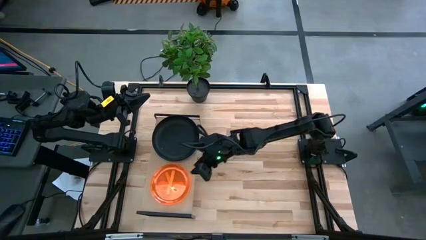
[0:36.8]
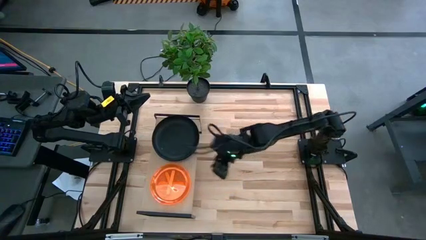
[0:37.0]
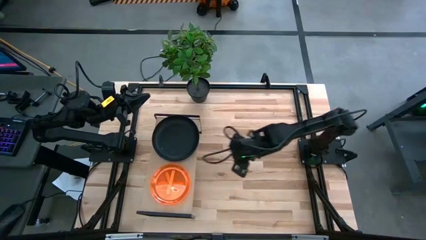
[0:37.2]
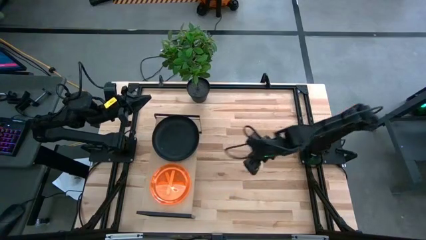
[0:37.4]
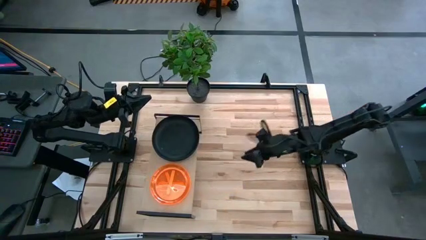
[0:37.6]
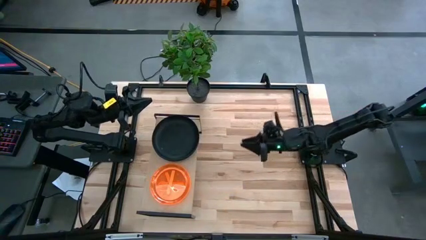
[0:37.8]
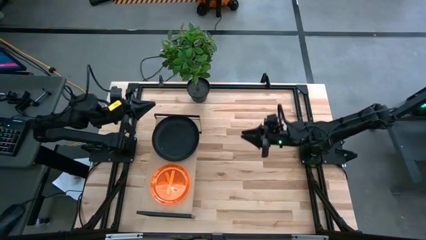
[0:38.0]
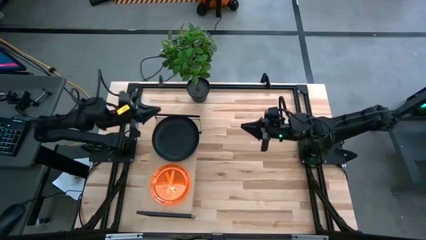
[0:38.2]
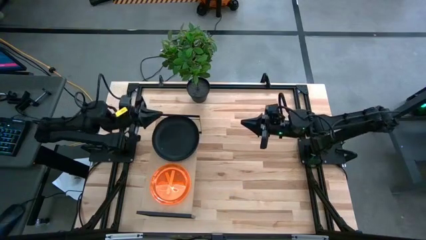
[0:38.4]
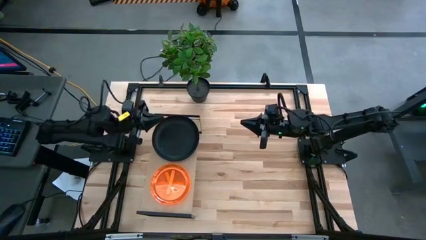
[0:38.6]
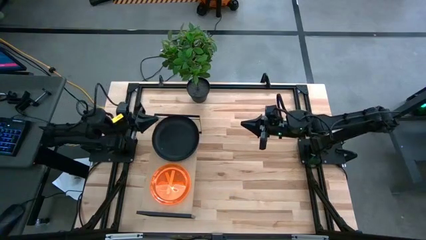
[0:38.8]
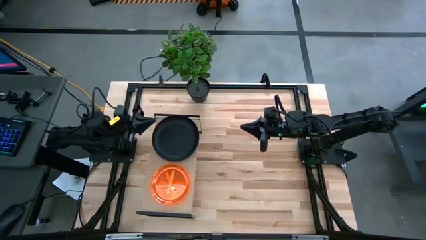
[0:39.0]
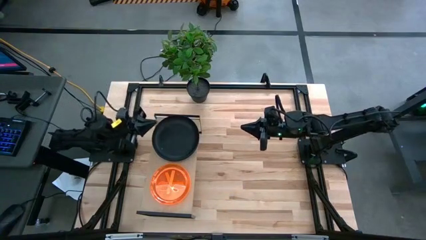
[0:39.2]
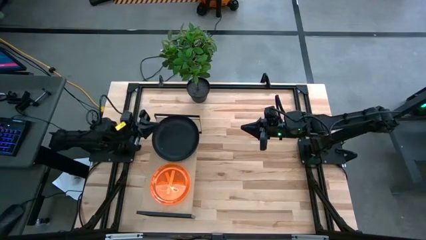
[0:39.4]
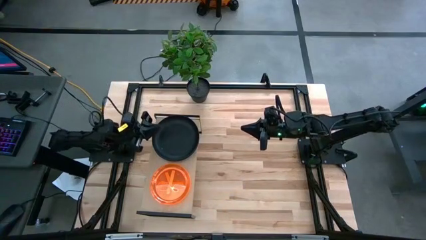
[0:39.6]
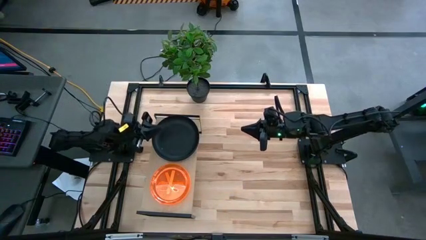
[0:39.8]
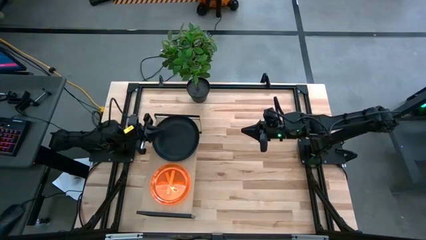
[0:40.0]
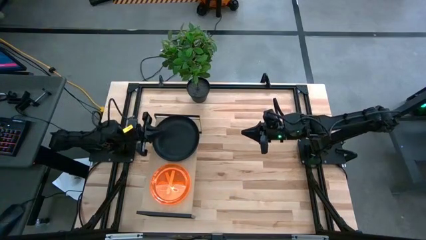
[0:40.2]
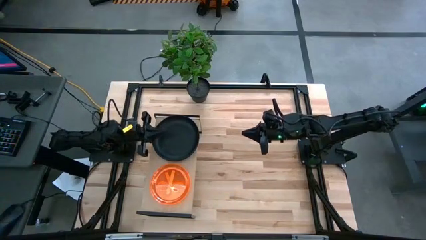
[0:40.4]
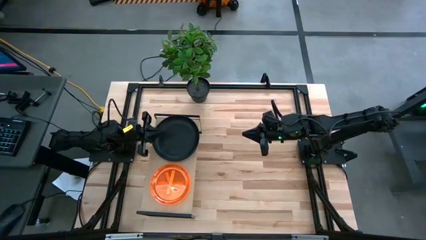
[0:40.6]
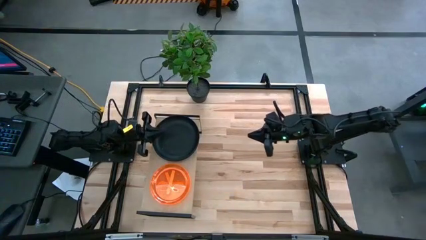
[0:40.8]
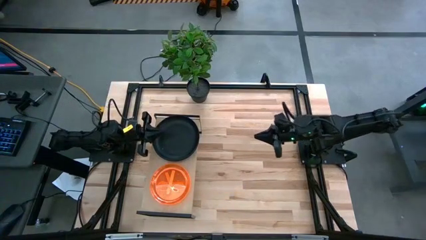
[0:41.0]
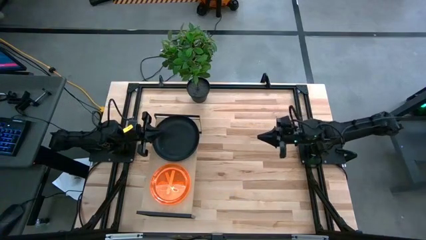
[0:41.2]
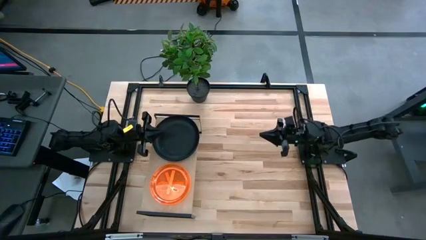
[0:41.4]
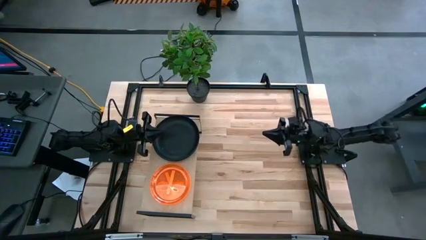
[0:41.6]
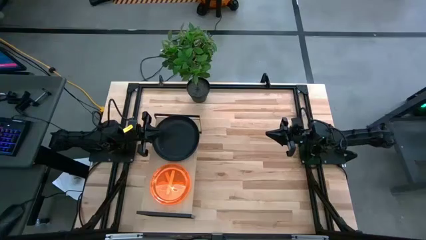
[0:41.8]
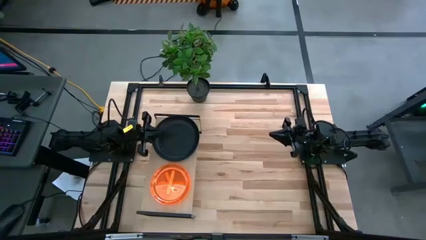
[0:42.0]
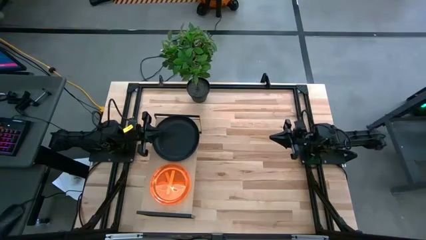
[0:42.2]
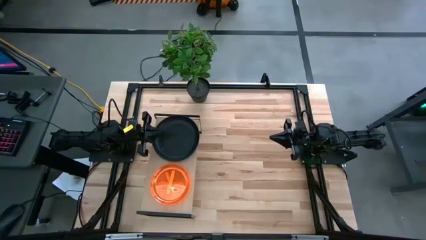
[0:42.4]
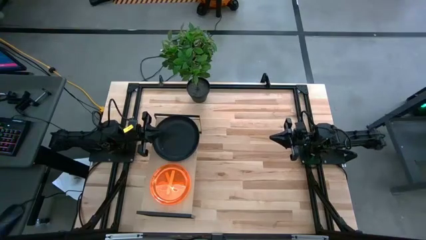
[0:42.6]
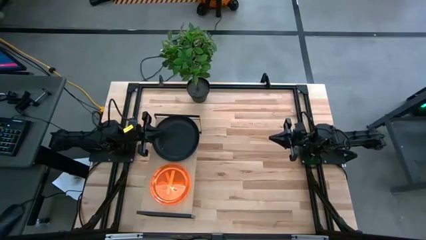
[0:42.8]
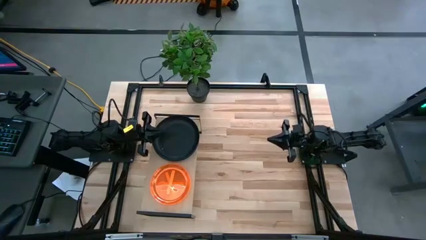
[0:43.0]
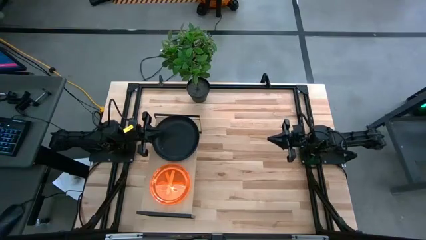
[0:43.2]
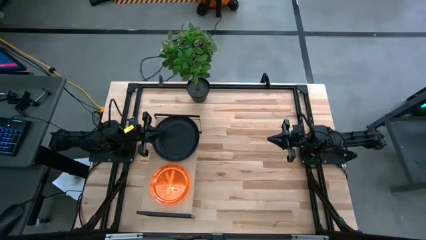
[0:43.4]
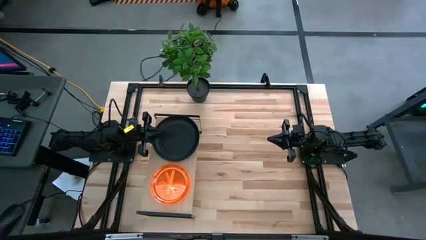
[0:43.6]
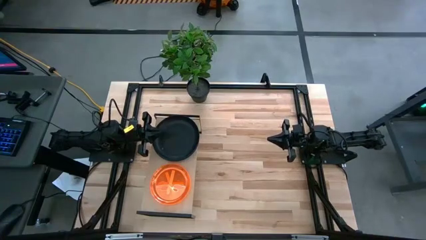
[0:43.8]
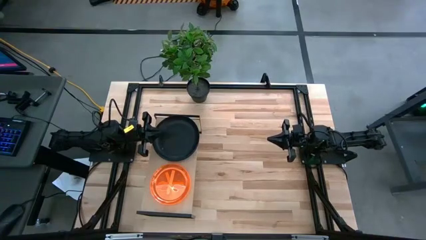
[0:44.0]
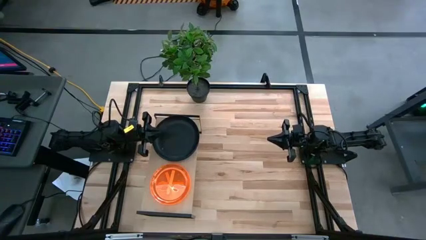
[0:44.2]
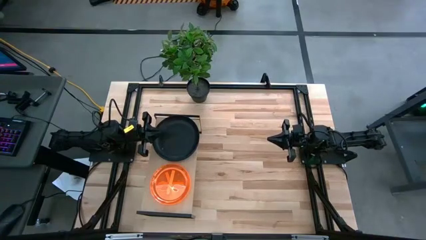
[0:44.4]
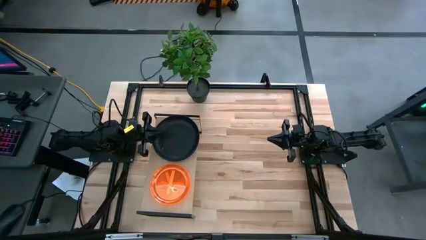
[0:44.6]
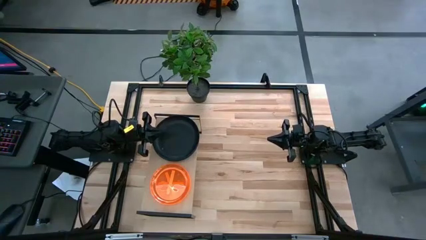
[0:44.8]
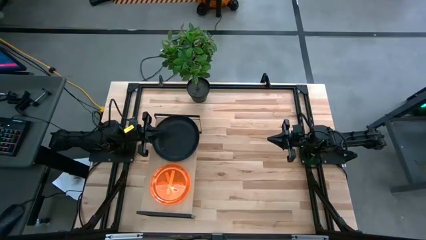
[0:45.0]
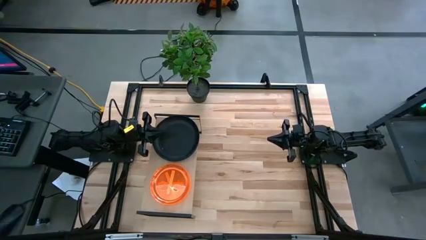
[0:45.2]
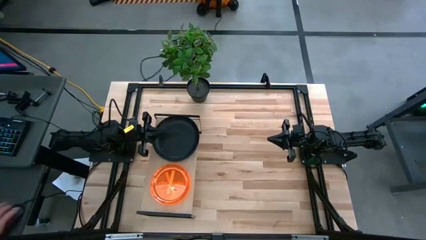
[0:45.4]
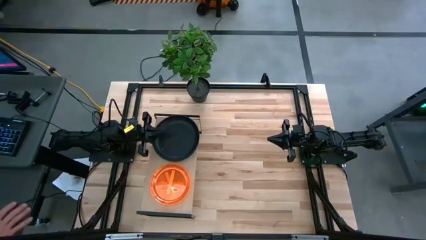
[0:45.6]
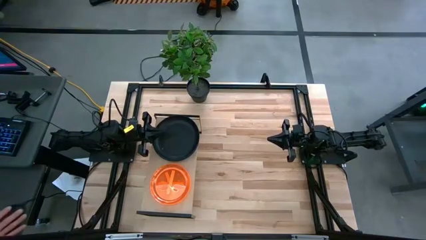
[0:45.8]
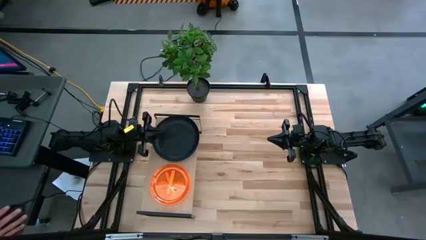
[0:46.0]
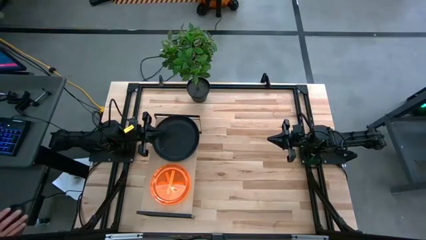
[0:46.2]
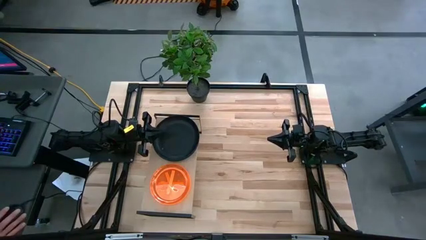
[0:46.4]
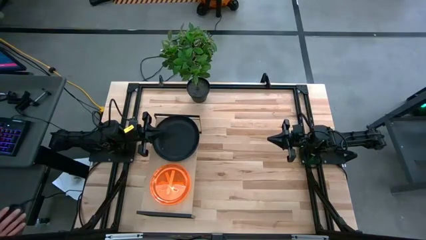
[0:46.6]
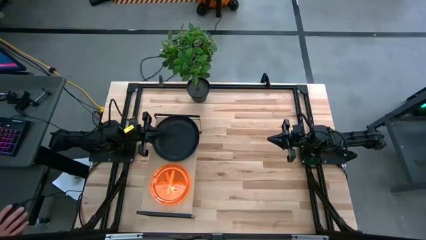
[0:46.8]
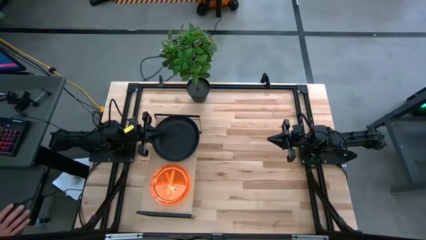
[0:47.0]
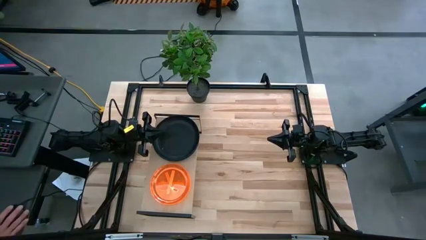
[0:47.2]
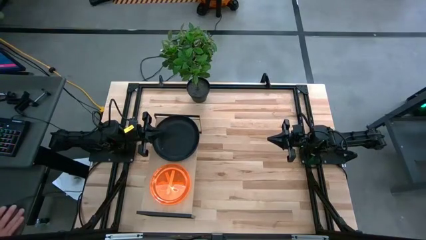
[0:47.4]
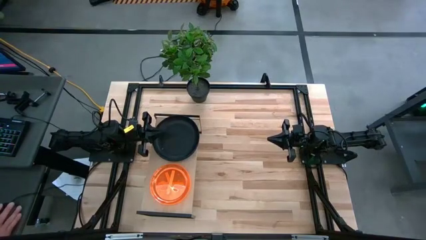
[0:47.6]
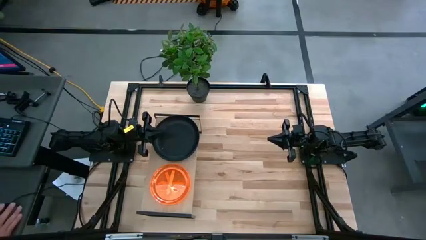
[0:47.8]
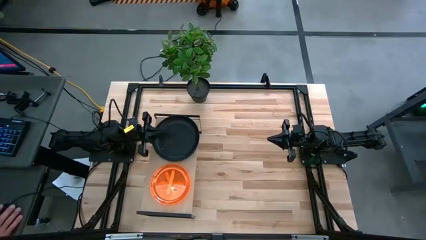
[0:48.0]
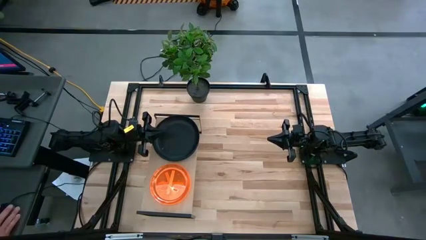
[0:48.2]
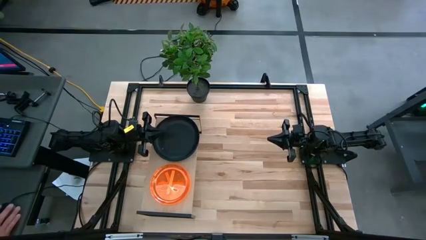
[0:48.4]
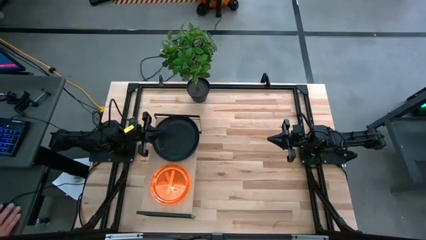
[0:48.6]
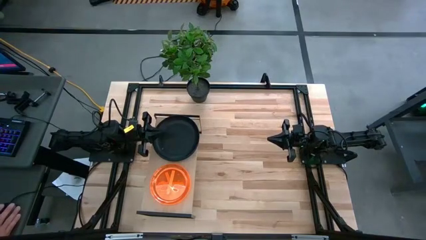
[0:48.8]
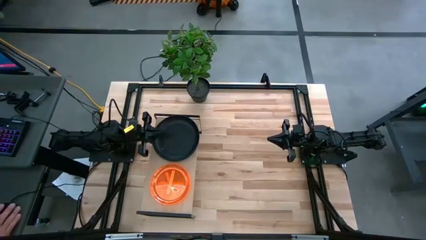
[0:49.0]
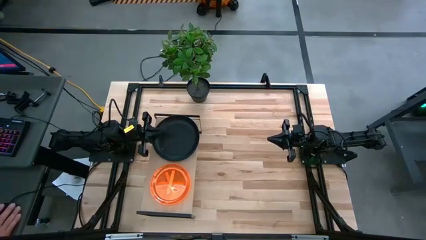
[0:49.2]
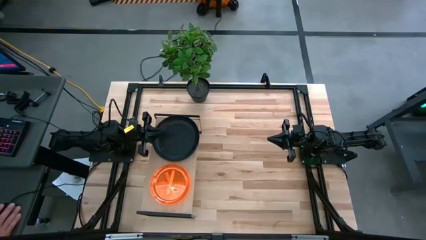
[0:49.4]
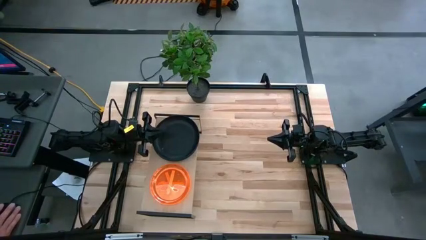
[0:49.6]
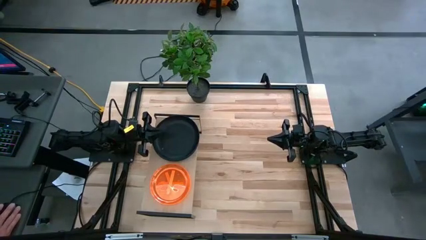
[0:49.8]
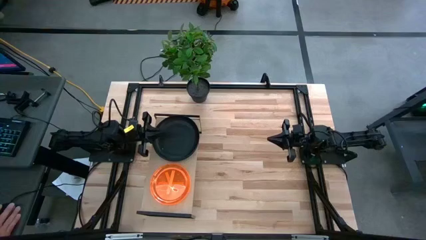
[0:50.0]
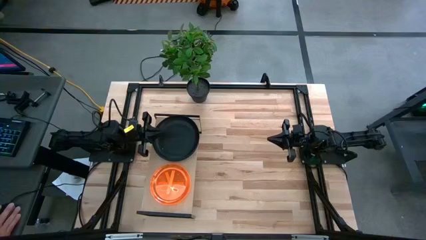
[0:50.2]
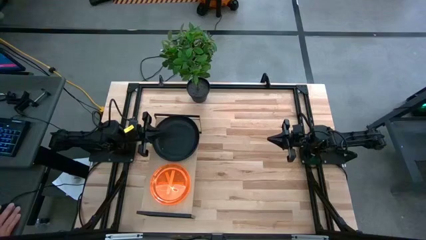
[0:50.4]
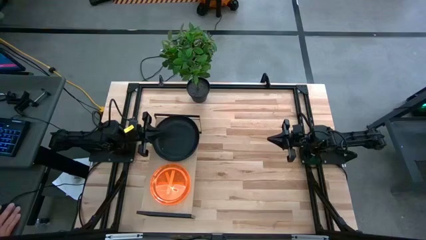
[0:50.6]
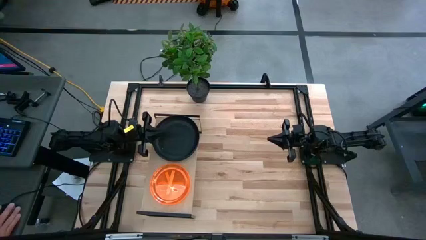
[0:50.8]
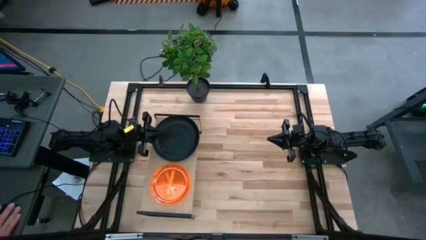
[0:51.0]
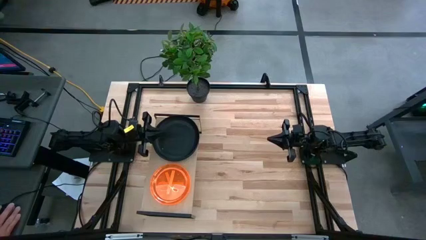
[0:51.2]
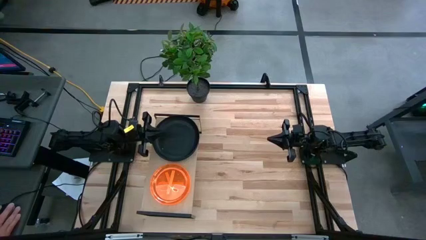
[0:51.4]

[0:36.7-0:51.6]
Task: Place and stack plates onto a shelf
Return to Home Position

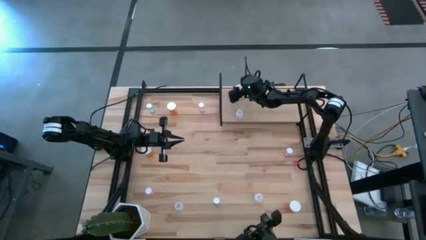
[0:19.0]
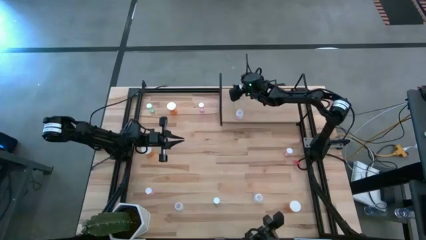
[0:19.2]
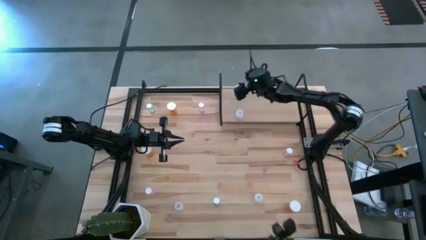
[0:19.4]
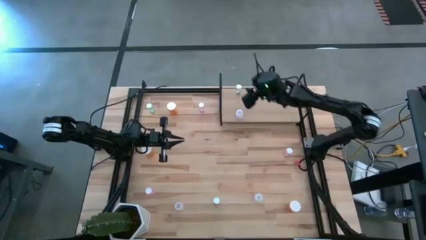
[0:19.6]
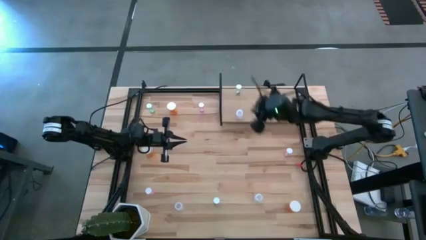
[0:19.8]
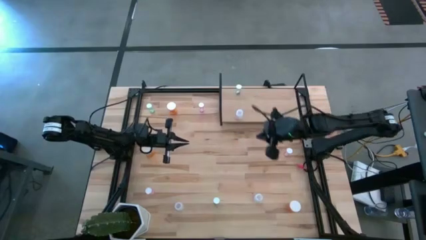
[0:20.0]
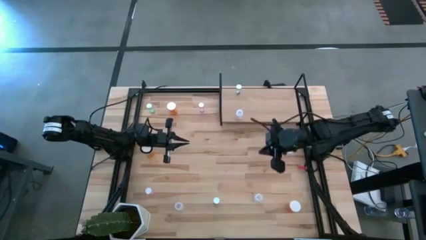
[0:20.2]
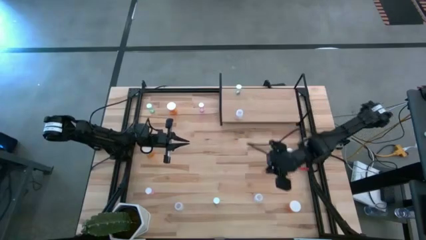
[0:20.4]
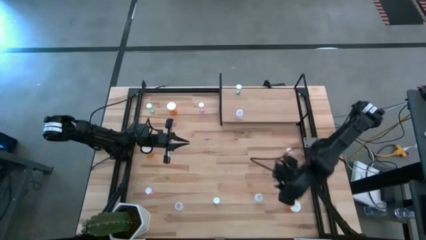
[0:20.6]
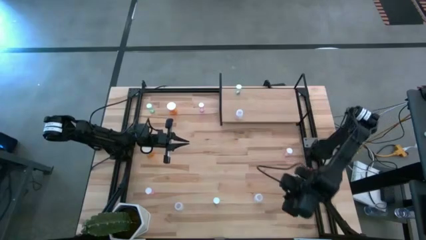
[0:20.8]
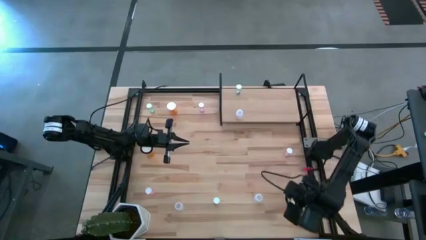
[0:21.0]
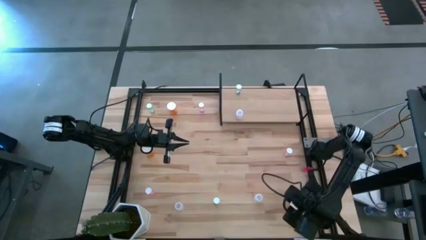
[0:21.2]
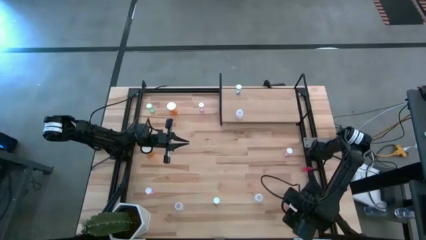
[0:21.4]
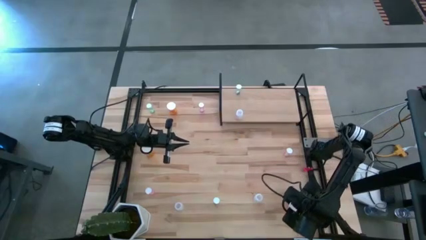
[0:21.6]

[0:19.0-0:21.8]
Task: Pick and place medicine bottles onto shelf by color
Put the bottom orange pill bottle on the shelf
